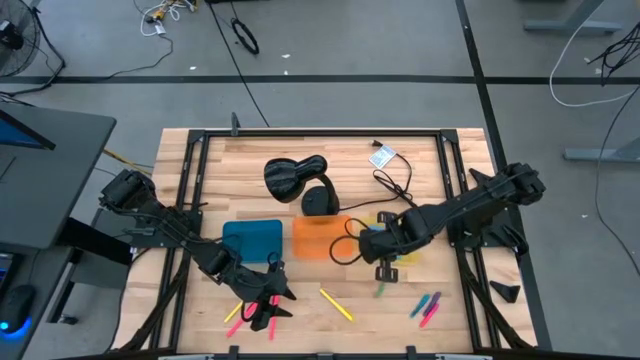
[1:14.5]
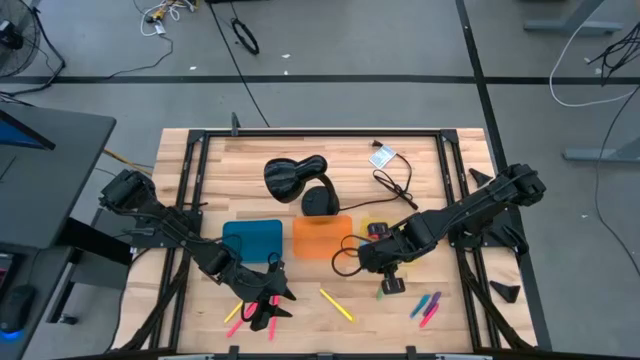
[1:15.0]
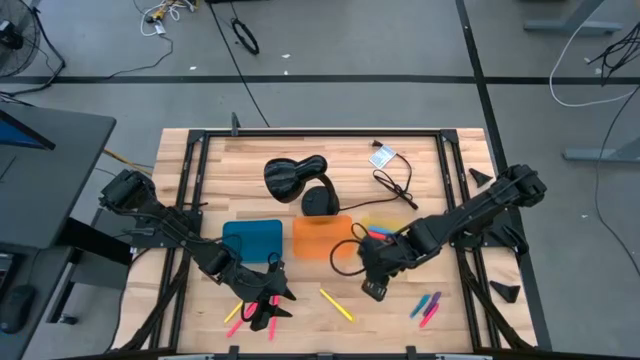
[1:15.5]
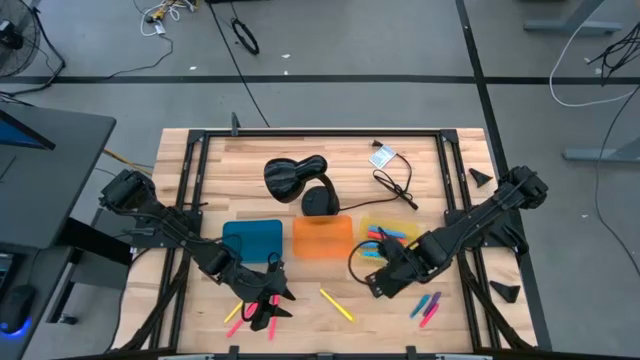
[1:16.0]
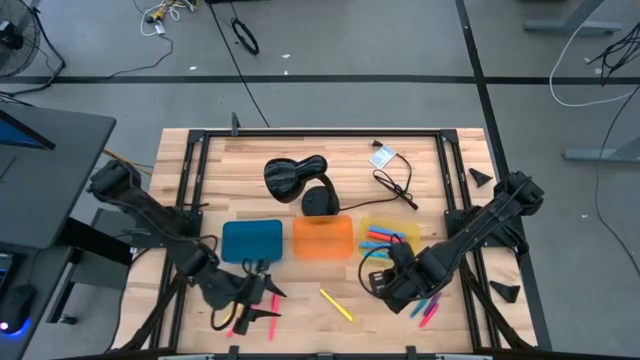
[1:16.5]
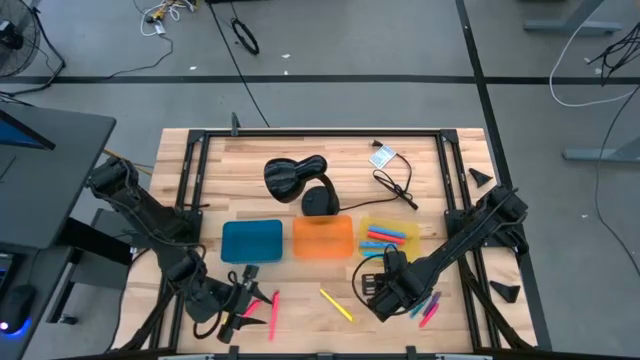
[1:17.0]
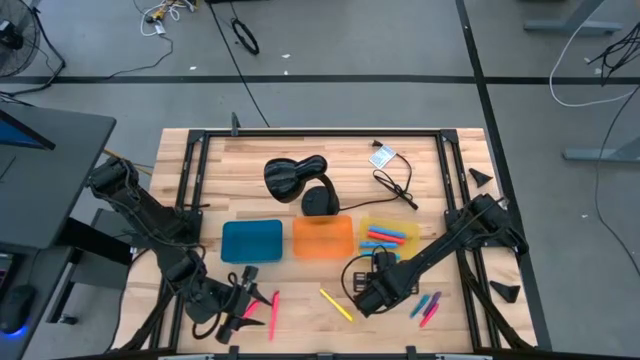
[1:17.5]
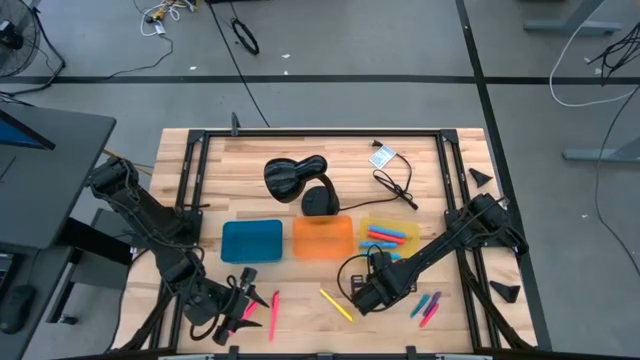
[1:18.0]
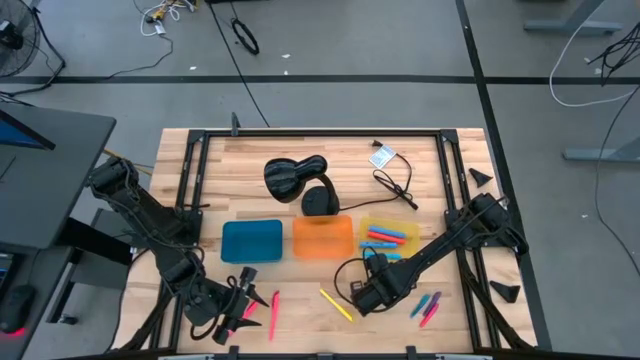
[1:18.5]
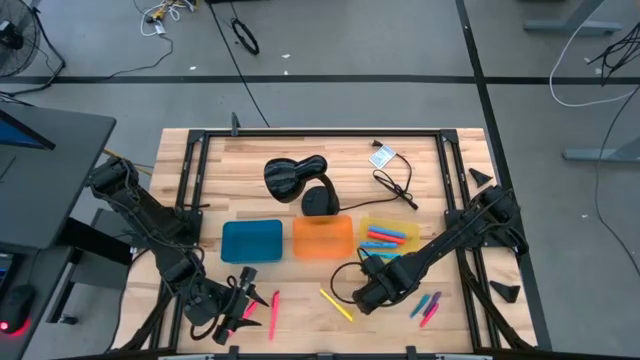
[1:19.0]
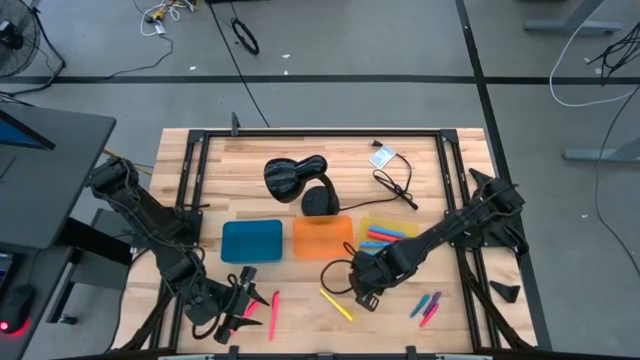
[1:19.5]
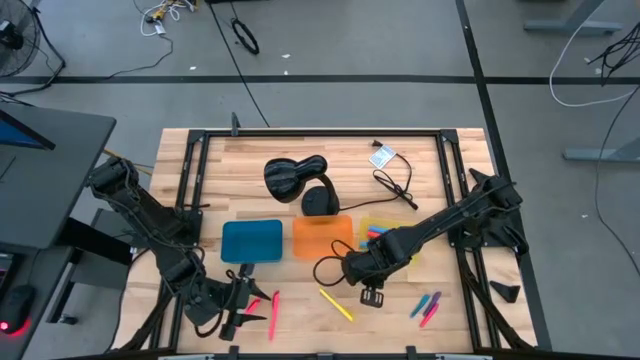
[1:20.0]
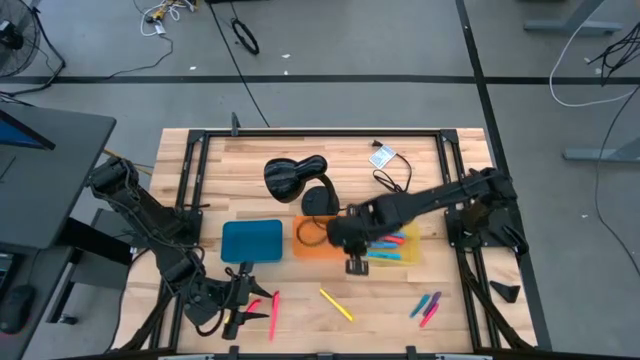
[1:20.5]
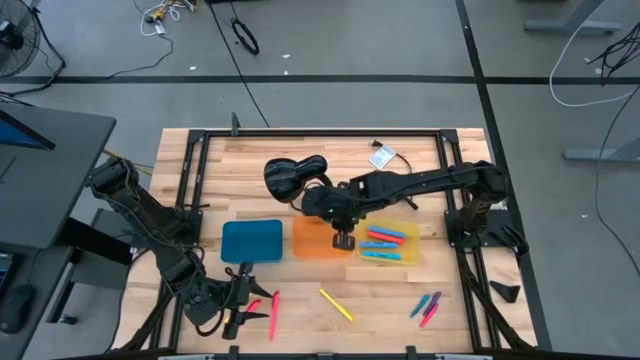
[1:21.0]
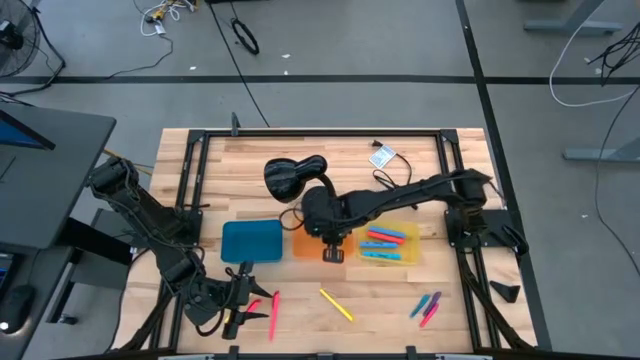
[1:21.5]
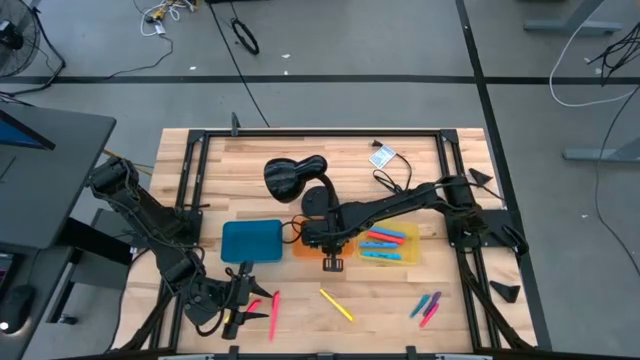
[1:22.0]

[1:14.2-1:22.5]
Task: Pick & Place Markers
Put the green pen into the orange bin

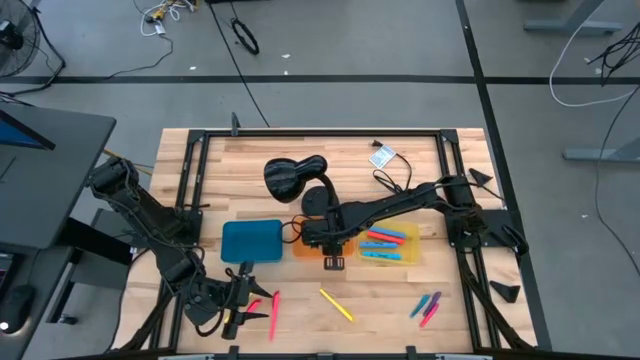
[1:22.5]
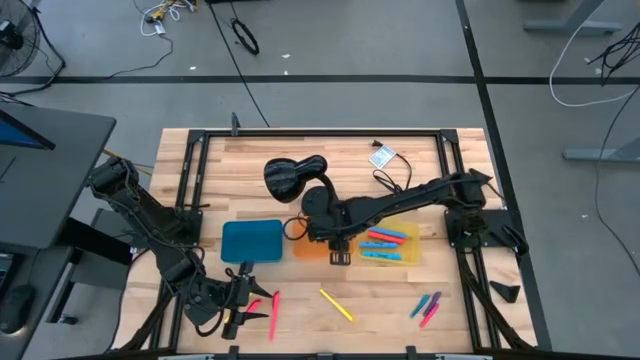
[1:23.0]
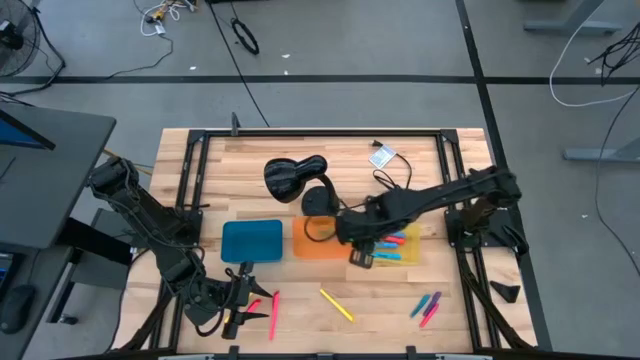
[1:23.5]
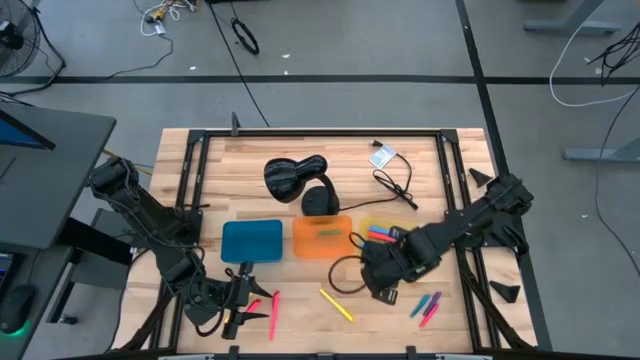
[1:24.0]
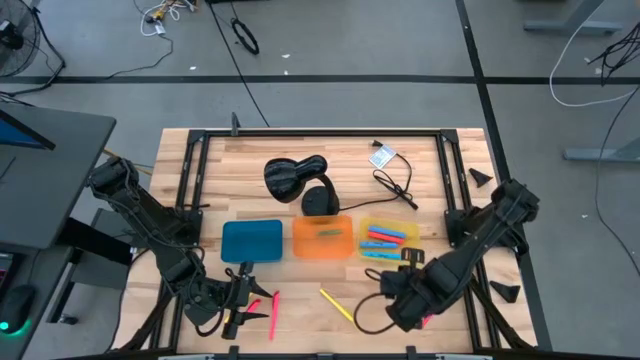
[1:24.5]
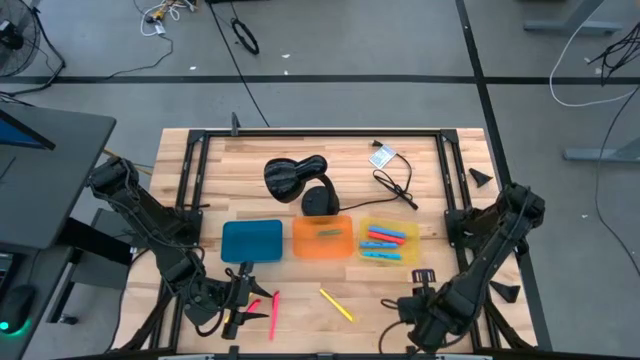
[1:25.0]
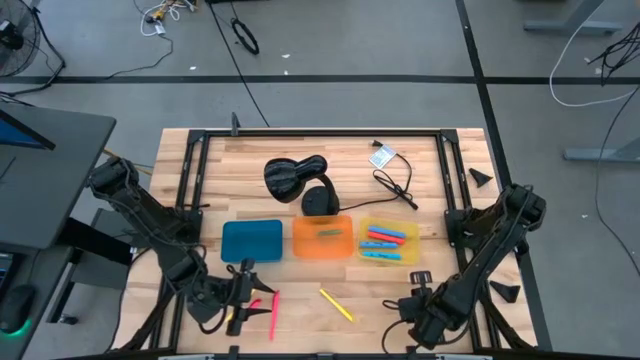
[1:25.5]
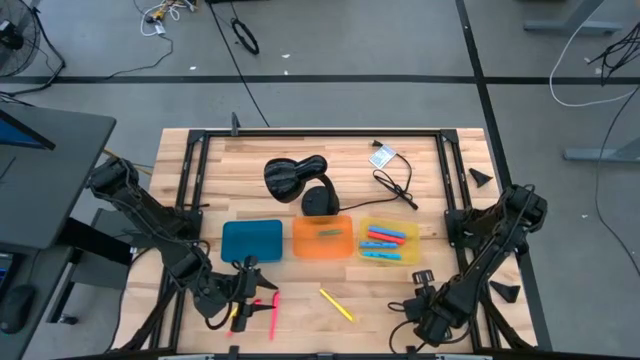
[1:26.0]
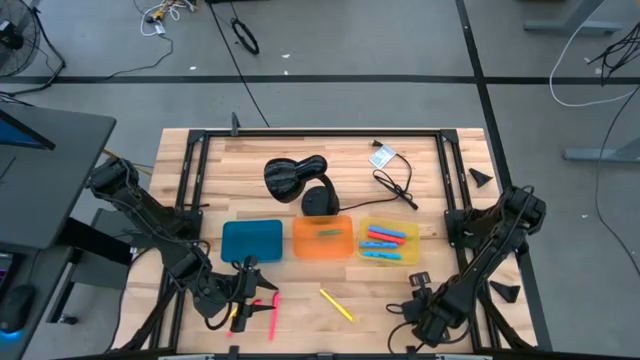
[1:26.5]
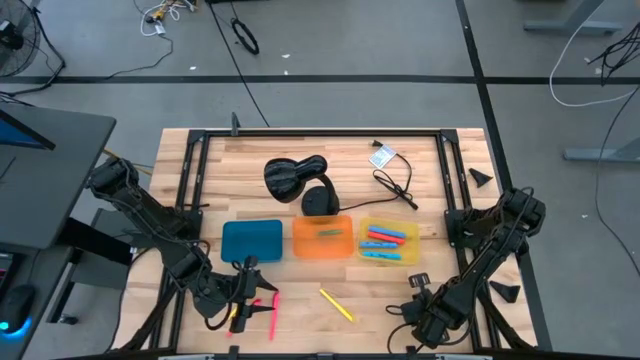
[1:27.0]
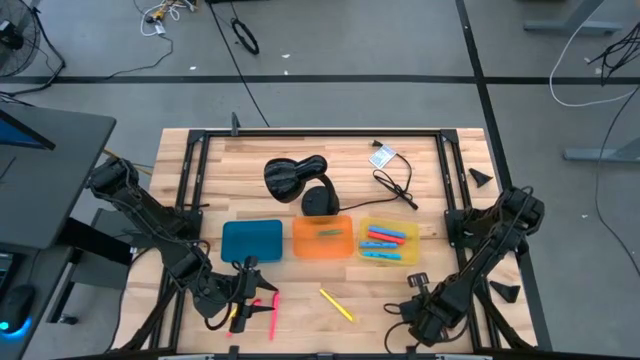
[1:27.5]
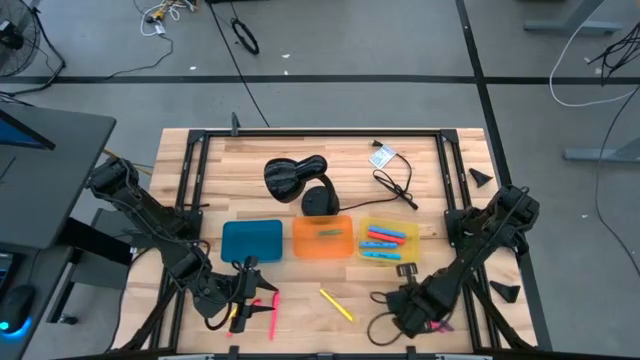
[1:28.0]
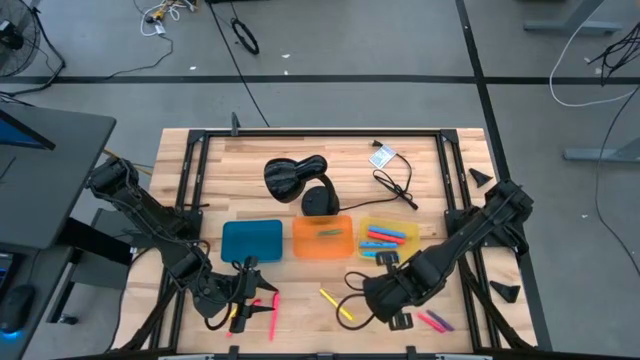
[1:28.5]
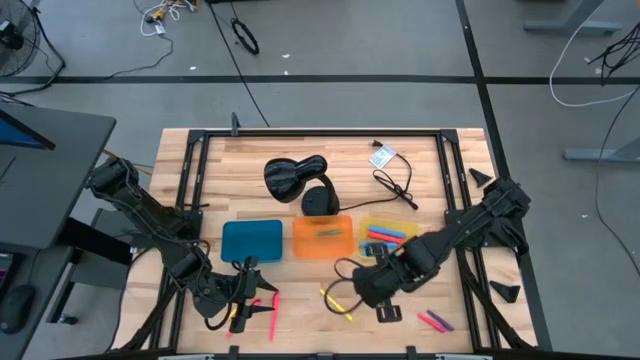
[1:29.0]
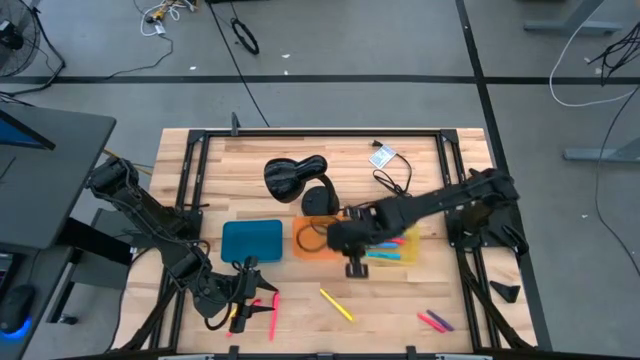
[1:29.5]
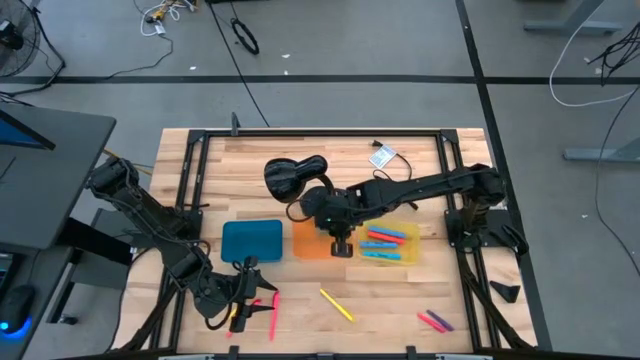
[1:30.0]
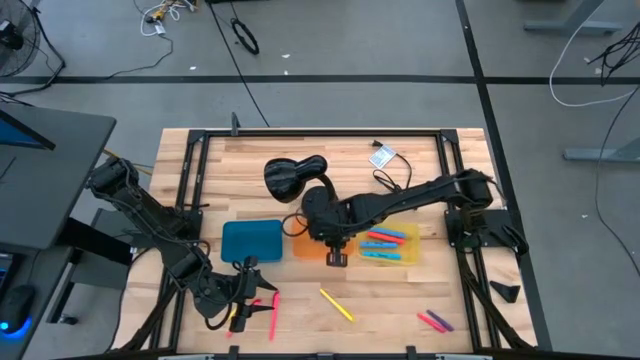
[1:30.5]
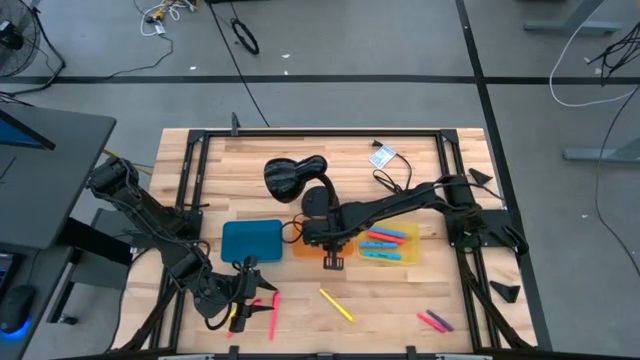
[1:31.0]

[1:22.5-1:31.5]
Put the blue pen into the orange bin

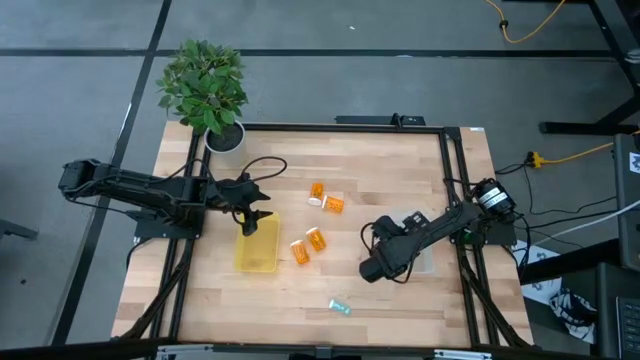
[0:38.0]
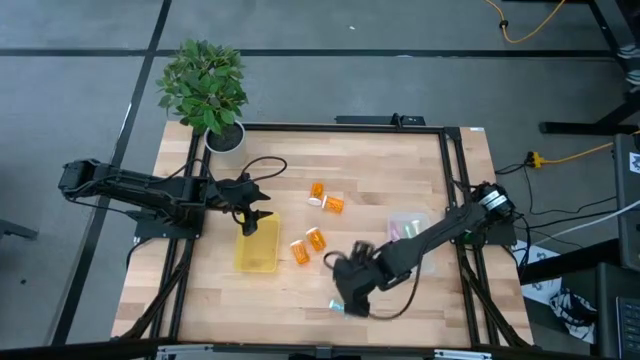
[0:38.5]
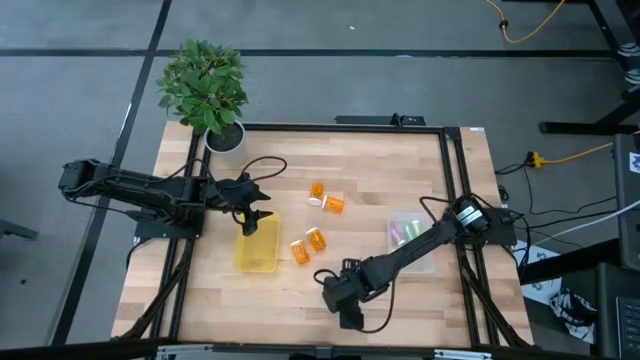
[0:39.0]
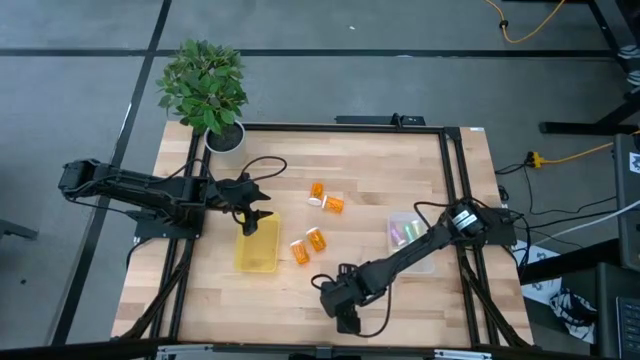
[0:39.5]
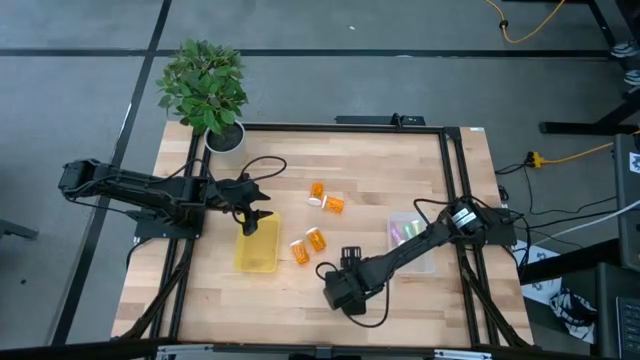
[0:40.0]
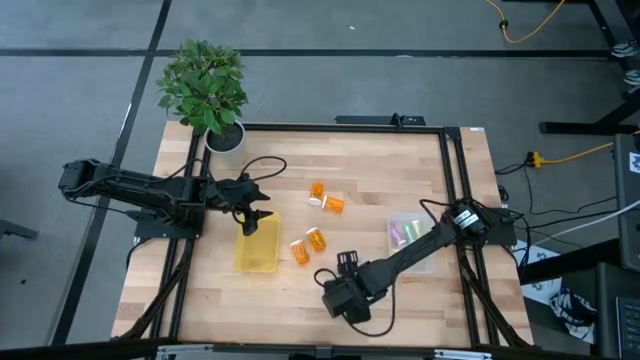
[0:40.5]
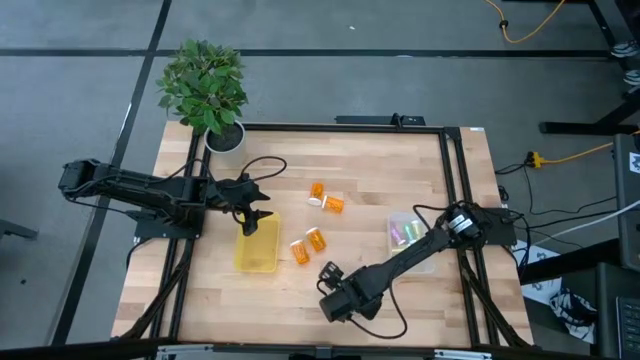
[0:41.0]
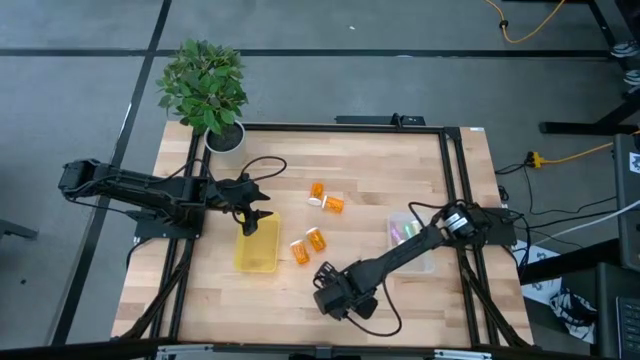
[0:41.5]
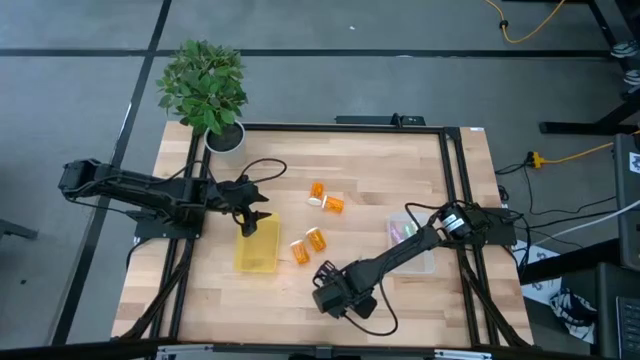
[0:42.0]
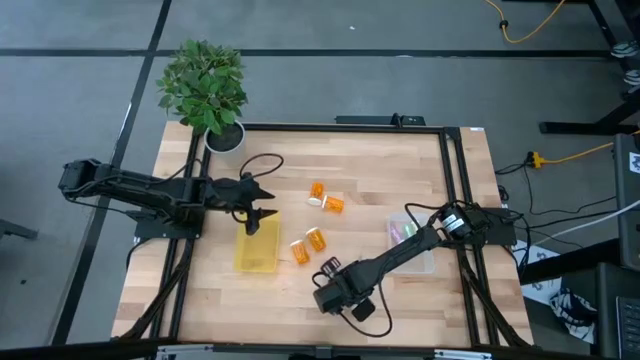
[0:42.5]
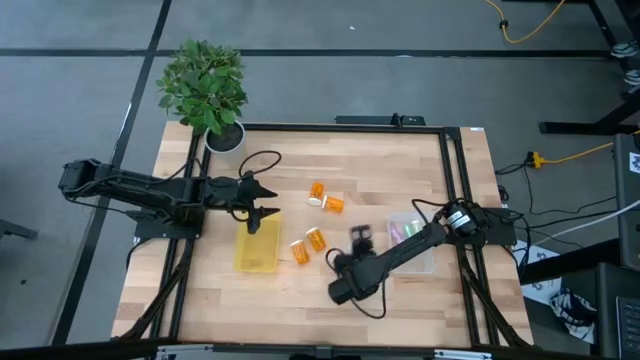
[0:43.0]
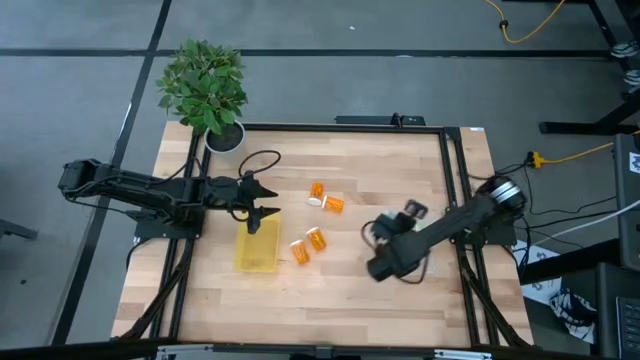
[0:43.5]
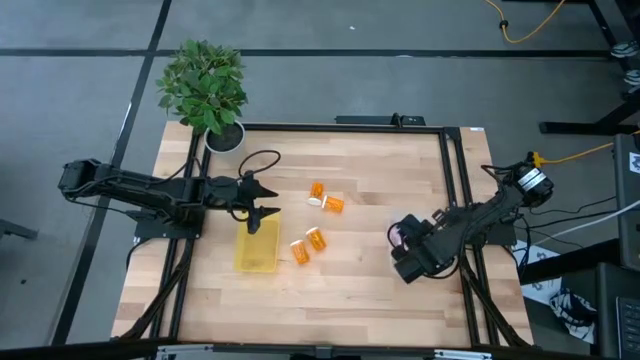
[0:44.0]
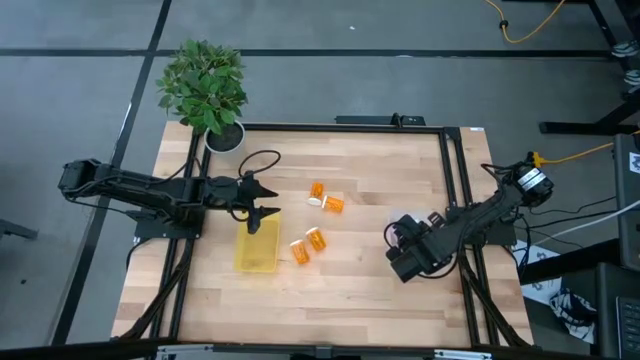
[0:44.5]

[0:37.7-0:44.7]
Task: Pick and place medicine bottles into bin by pill shape (circle, oval)
Put the blue pill bottle into the transparent bin
